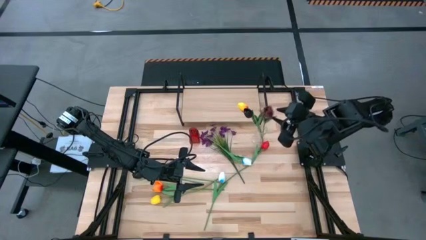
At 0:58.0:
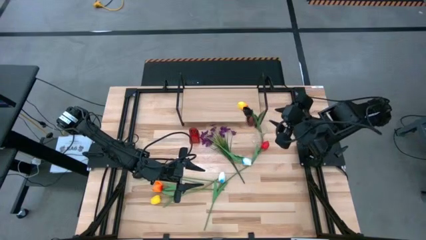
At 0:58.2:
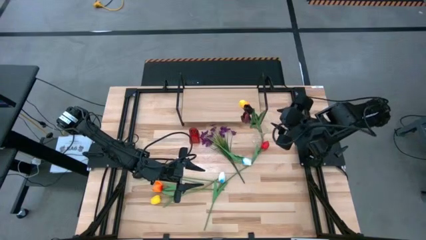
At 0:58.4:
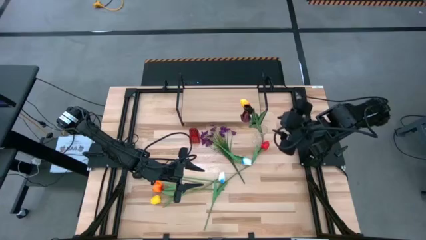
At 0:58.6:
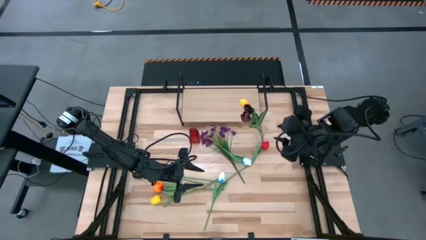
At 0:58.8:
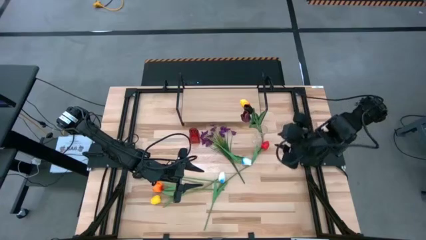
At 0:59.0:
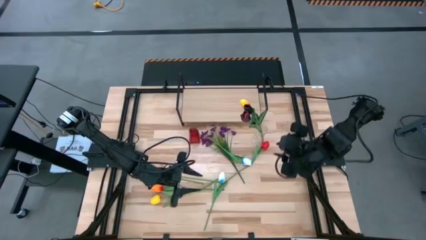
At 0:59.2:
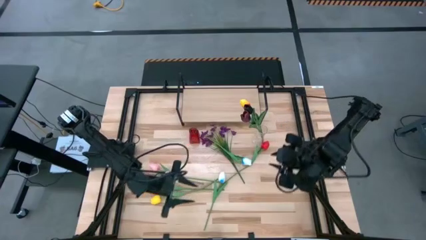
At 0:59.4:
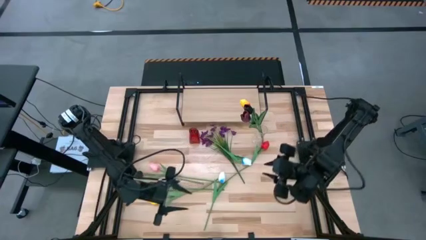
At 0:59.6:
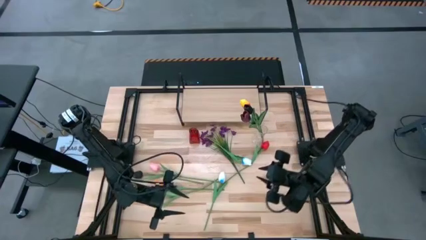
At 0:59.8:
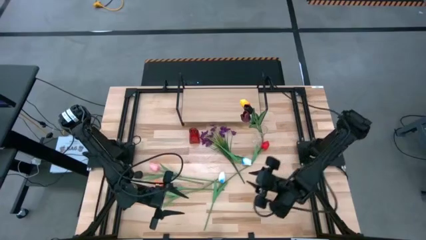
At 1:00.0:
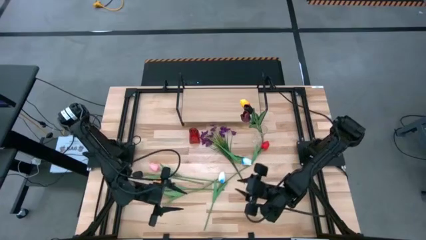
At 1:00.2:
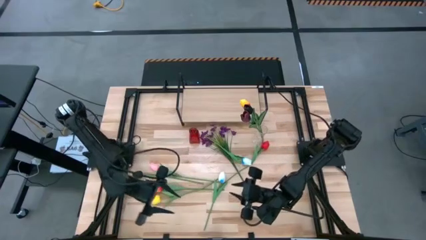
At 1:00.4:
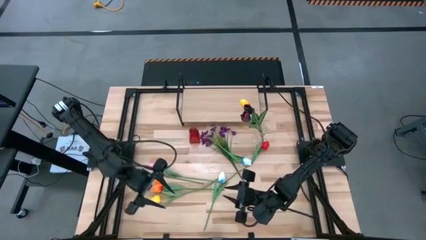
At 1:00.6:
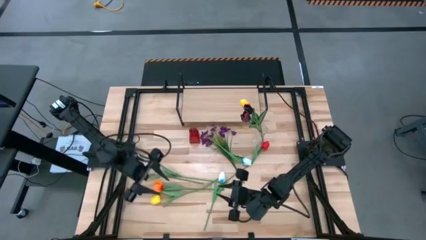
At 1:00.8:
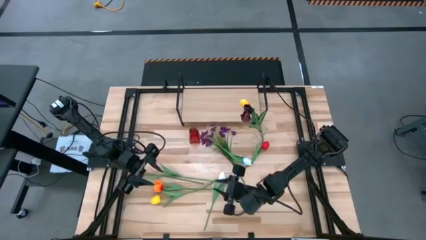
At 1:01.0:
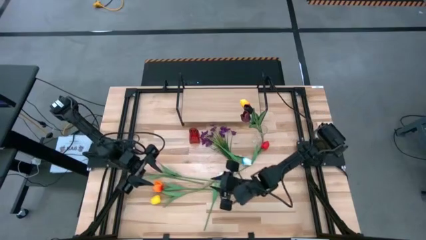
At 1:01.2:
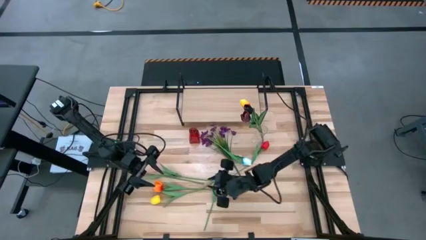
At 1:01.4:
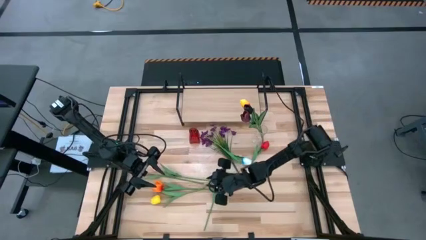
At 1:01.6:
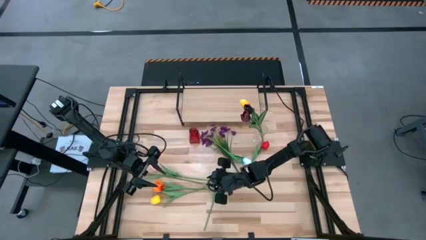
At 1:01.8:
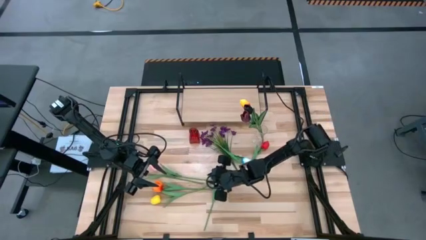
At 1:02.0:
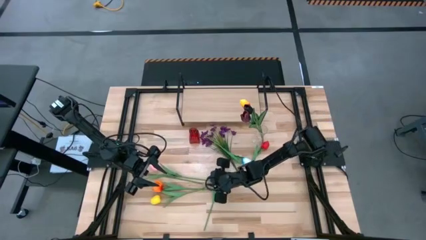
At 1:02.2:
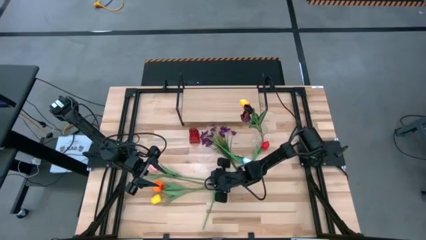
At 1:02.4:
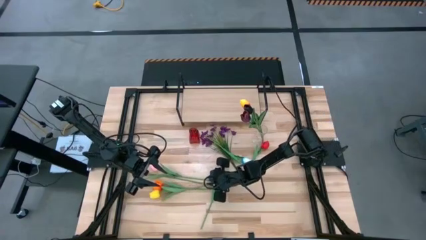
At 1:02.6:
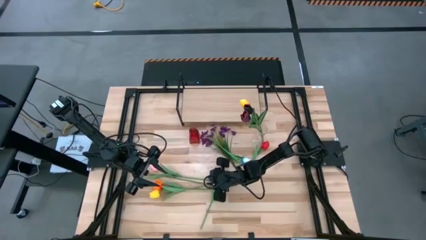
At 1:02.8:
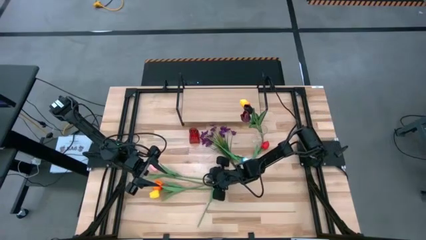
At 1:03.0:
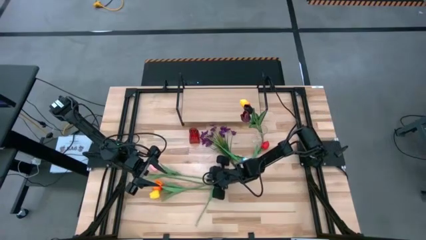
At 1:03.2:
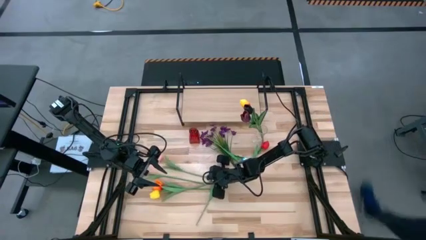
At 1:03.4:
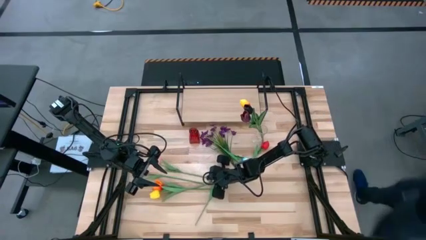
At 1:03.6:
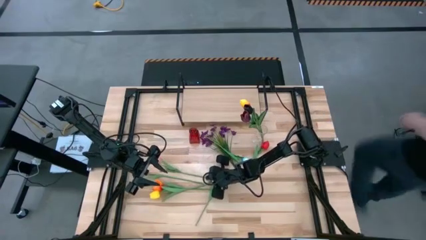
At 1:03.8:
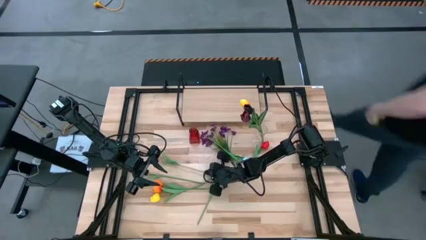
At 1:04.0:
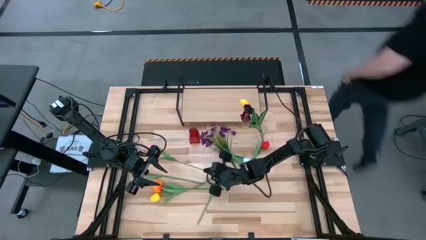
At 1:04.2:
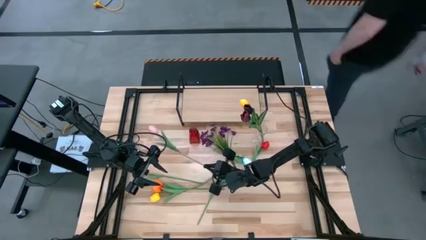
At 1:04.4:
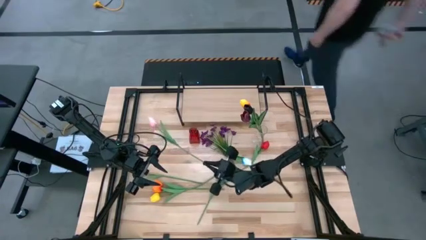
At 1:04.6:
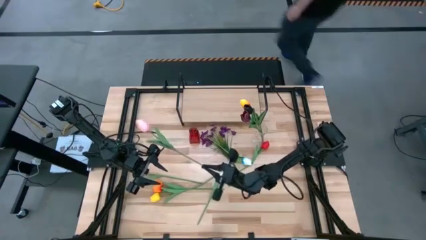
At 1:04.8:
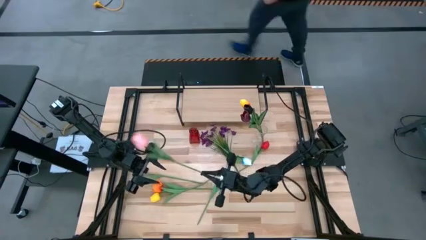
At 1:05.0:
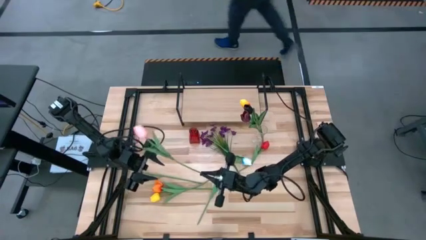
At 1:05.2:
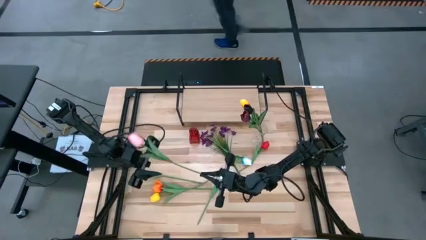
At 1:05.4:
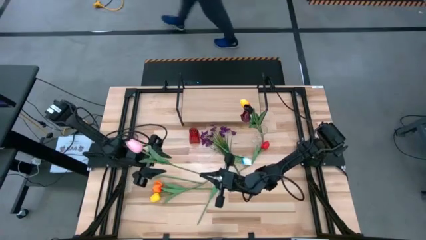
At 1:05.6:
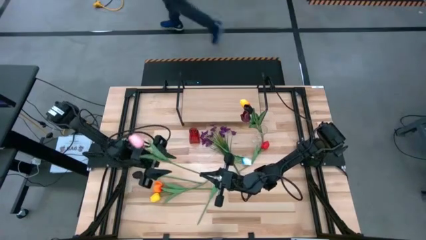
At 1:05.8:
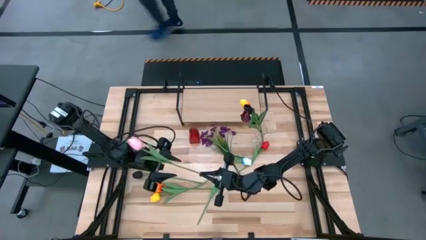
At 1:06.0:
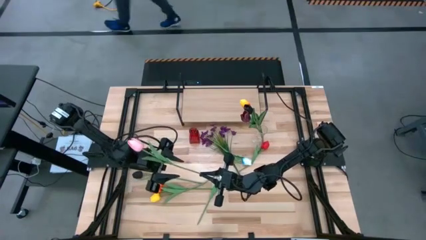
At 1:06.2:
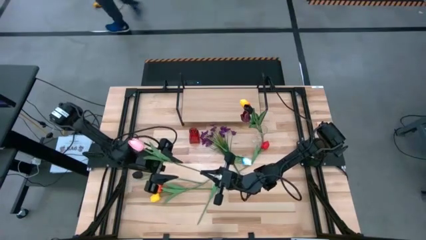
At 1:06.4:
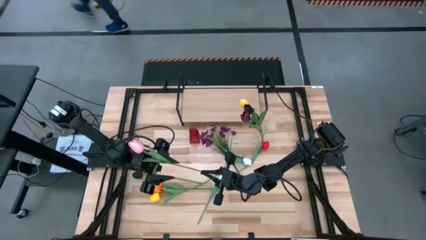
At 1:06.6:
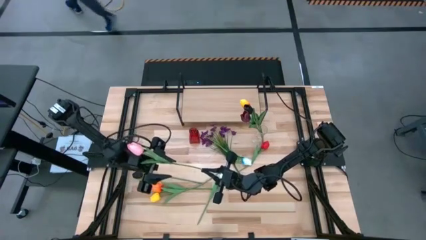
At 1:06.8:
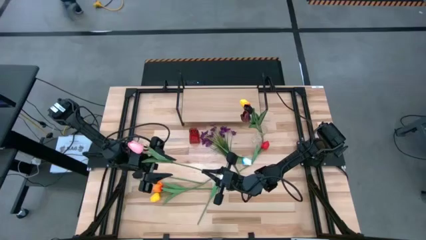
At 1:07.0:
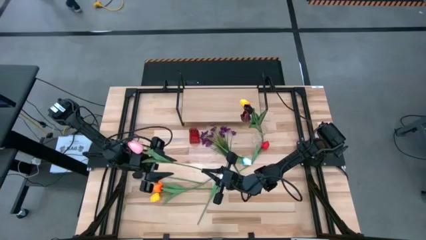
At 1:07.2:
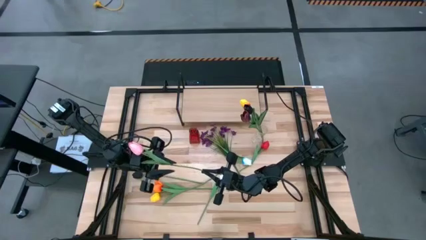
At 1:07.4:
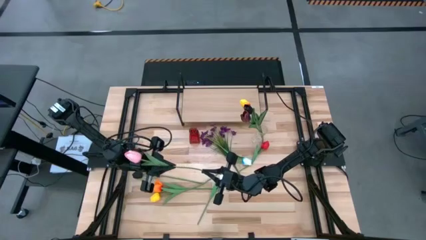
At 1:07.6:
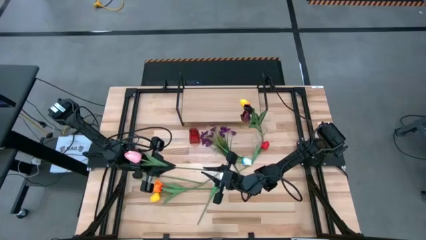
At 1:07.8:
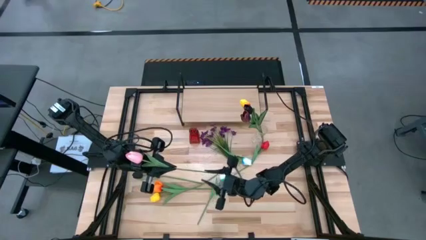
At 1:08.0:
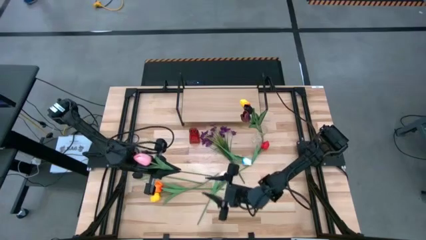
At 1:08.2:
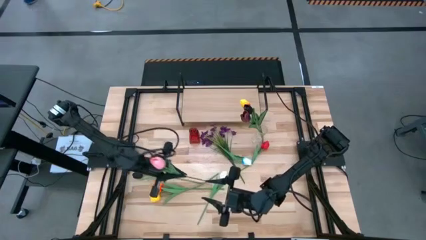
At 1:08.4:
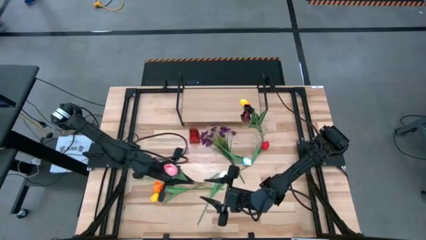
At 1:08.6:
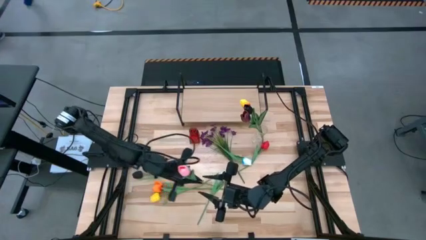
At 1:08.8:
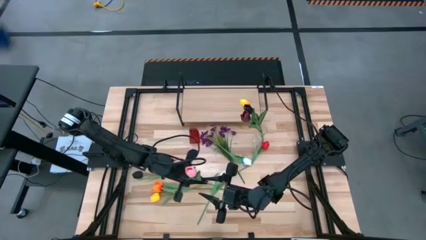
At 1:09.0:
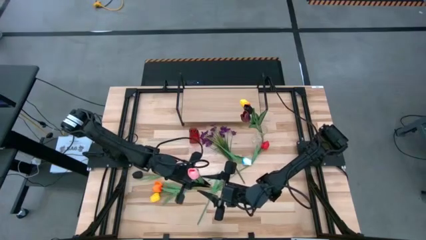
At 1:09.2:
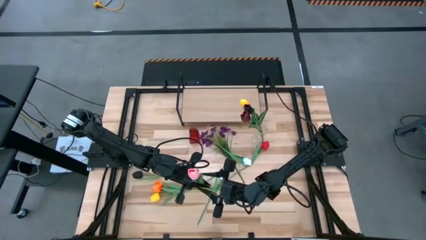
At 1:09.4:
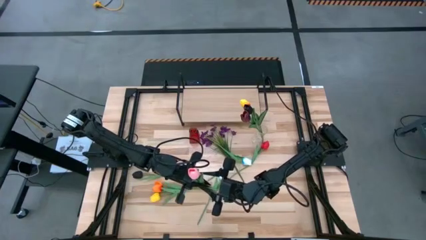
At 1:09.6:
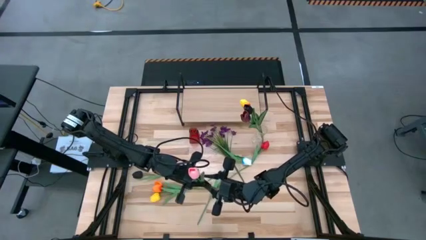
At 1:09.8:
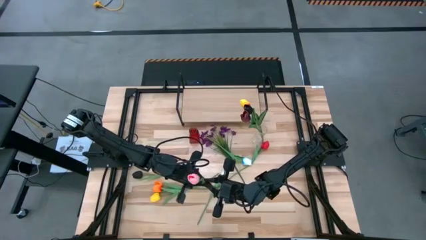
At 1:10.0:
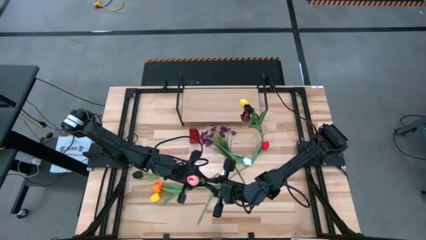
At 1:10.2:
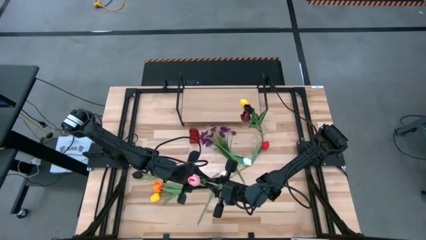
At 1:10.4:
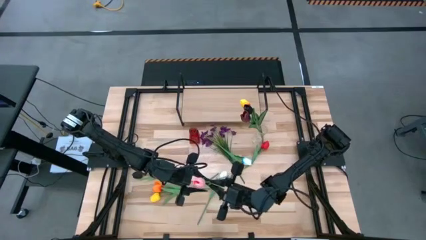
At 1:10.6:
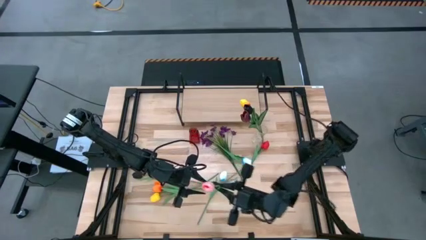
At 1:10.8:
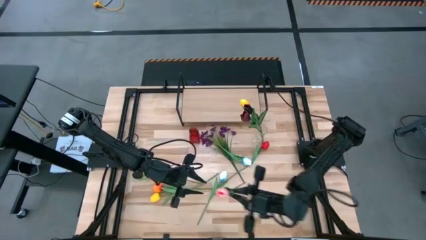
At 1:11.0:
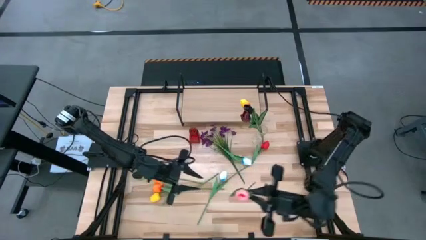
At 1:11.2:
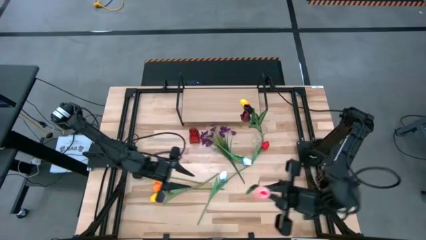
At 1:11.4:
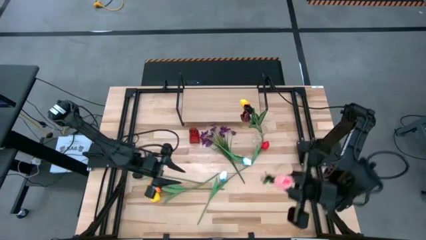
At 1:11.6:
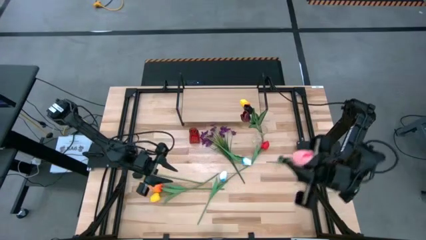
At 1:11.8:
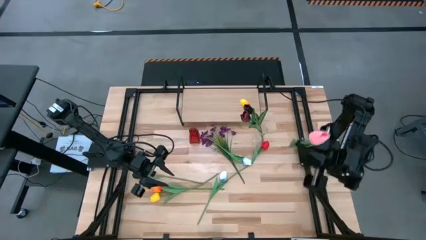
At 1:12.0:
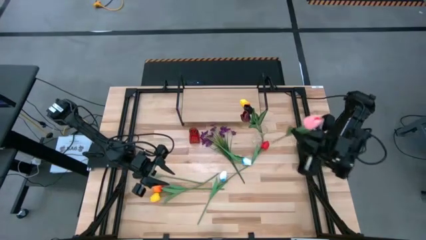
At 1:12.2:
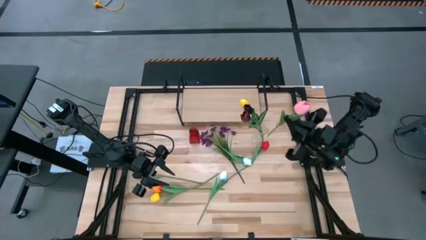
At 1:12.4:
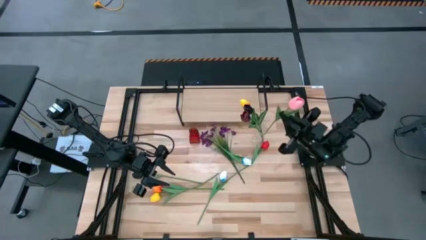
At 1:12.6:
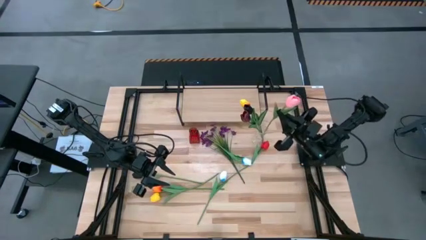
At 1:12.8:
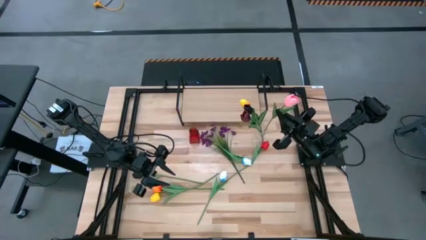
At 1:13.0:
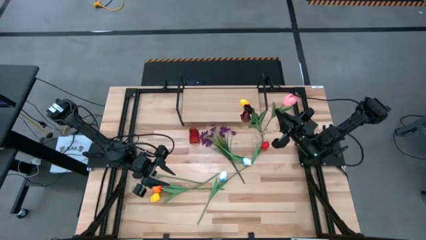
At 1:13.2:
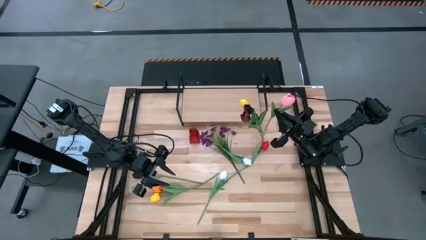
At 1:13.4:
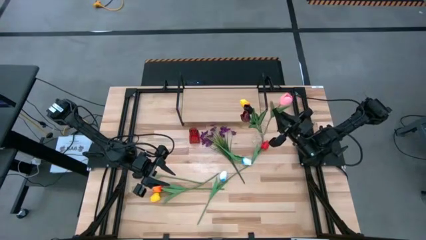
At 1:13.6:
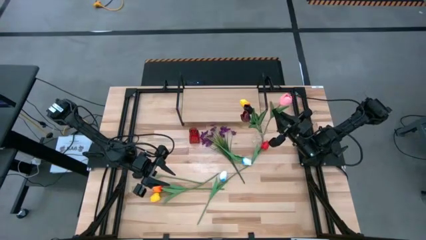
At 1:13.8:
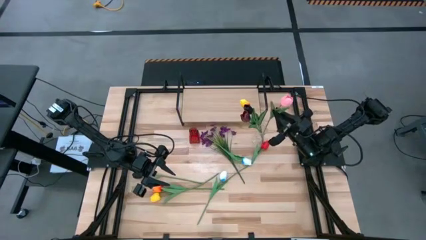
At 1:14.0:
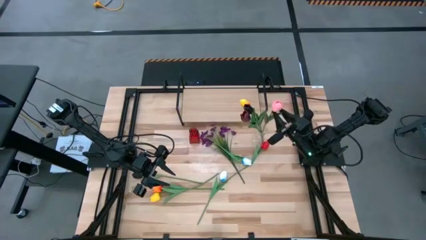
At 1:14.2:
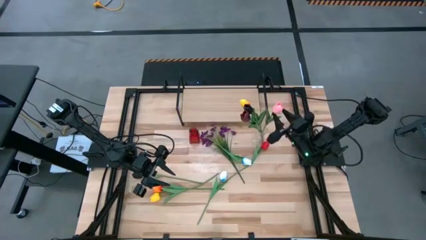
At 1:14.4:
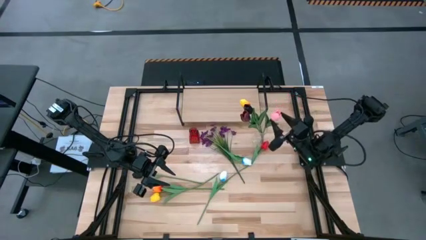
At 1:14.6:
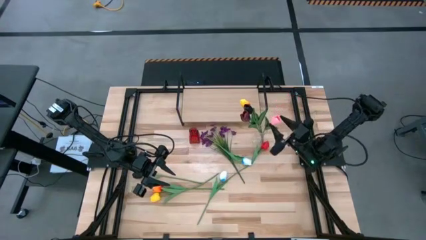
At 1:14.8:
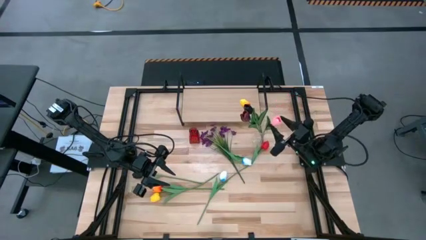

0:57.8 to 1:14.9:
Task: Pick and place flowers into a vace then onto a shelf
Put the pink flower into the transparent vase
